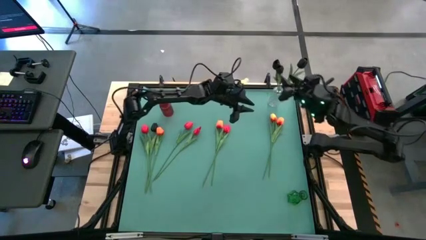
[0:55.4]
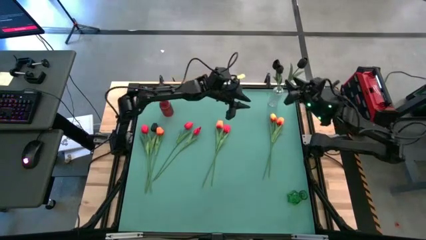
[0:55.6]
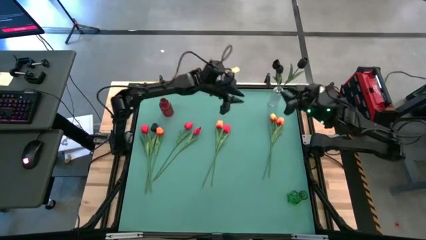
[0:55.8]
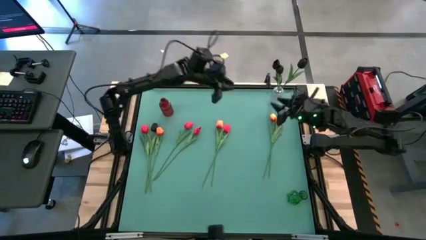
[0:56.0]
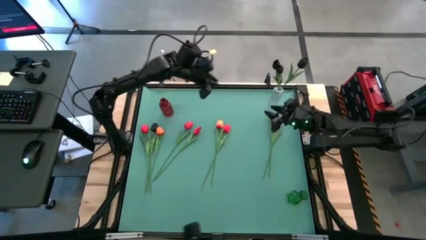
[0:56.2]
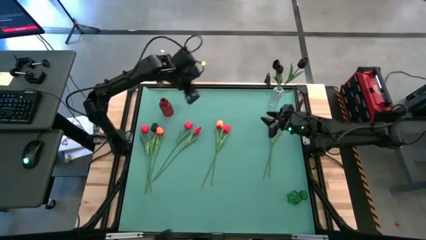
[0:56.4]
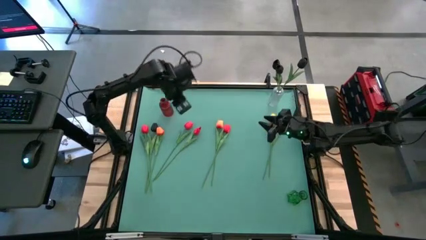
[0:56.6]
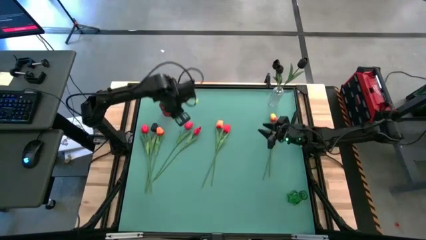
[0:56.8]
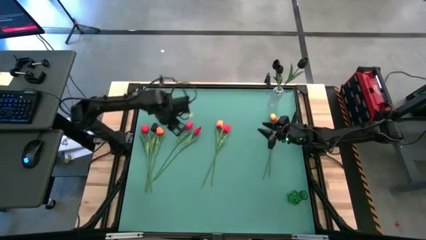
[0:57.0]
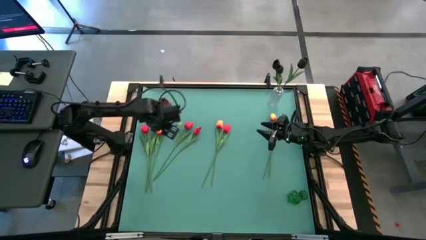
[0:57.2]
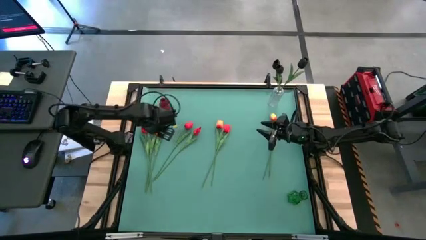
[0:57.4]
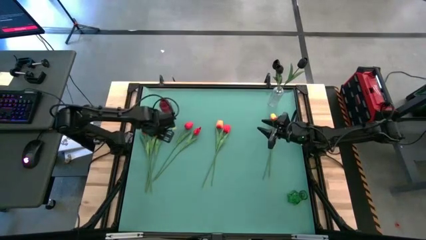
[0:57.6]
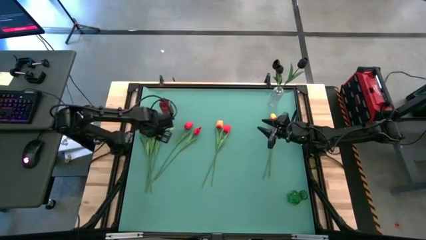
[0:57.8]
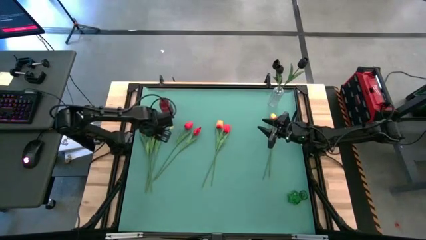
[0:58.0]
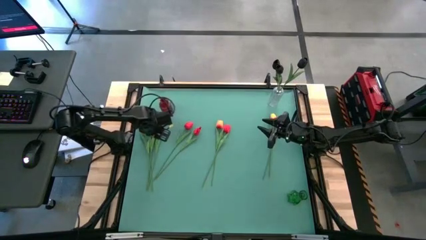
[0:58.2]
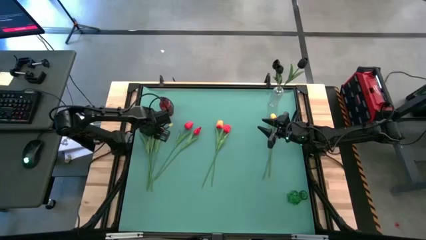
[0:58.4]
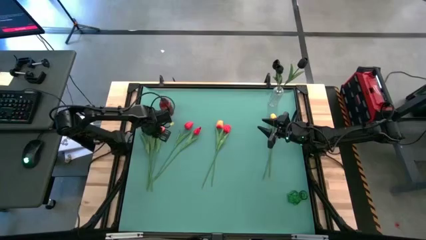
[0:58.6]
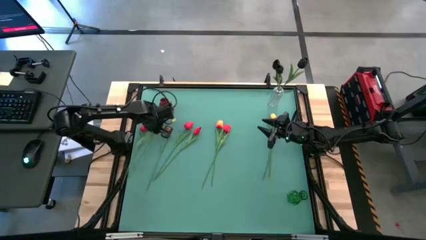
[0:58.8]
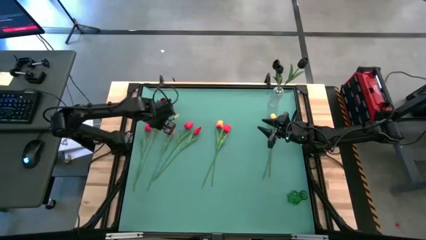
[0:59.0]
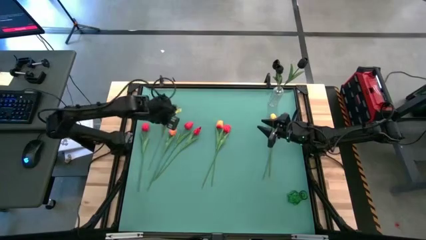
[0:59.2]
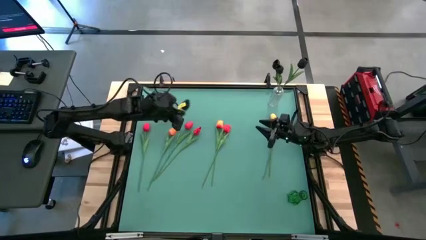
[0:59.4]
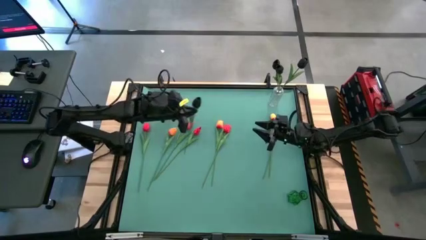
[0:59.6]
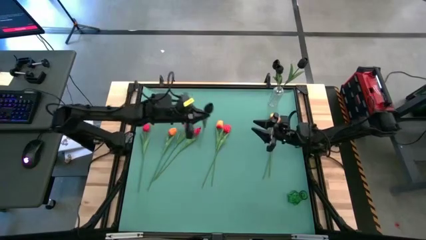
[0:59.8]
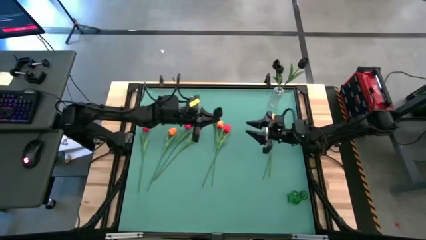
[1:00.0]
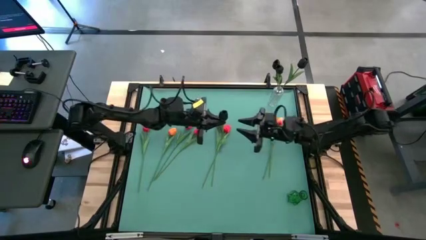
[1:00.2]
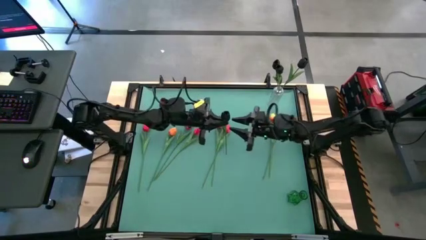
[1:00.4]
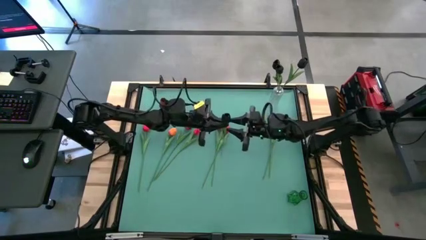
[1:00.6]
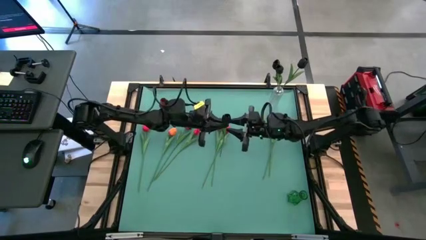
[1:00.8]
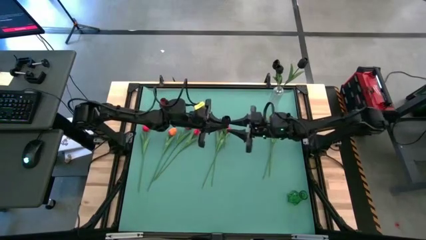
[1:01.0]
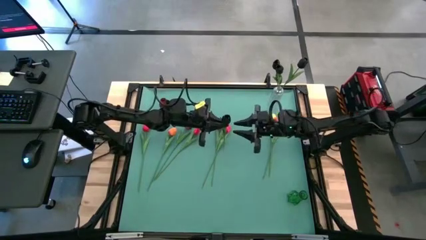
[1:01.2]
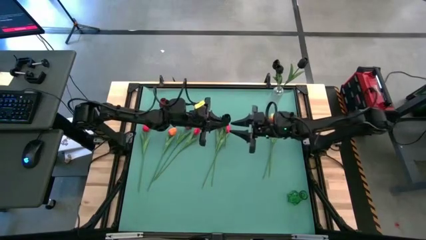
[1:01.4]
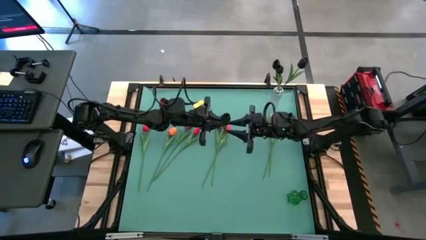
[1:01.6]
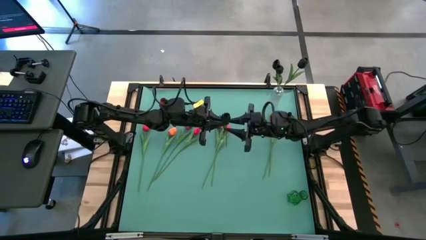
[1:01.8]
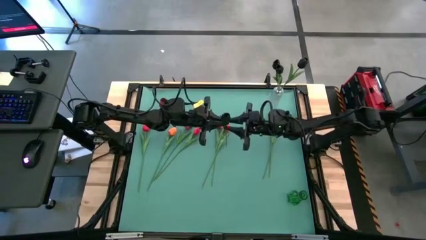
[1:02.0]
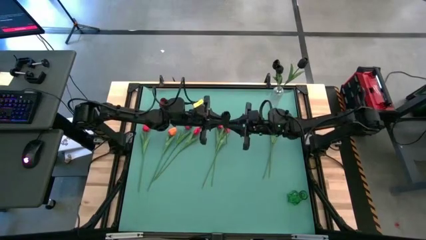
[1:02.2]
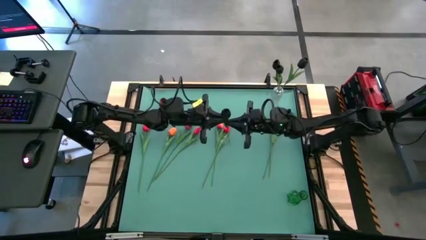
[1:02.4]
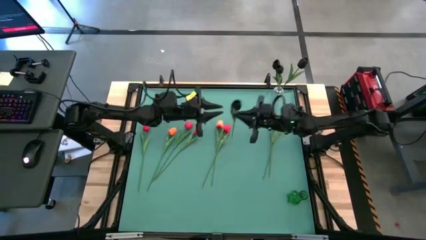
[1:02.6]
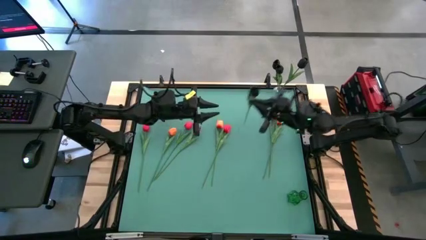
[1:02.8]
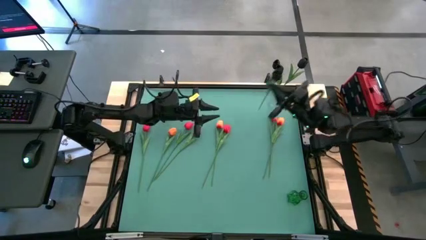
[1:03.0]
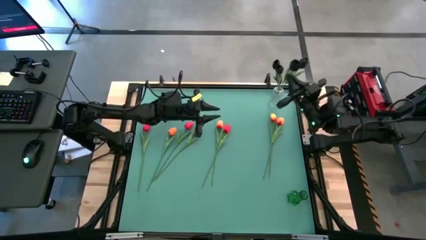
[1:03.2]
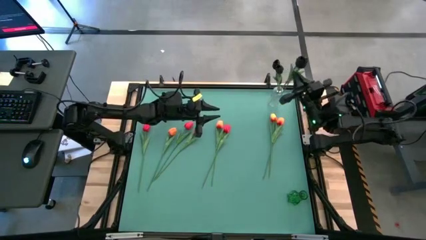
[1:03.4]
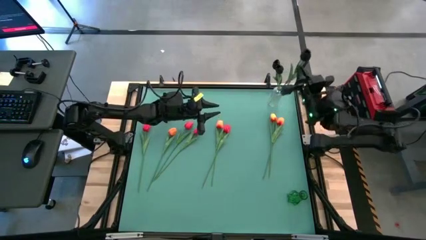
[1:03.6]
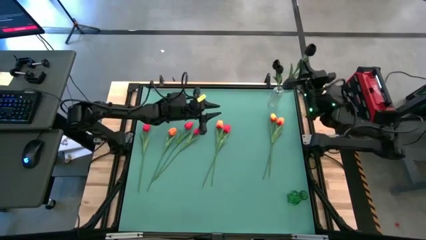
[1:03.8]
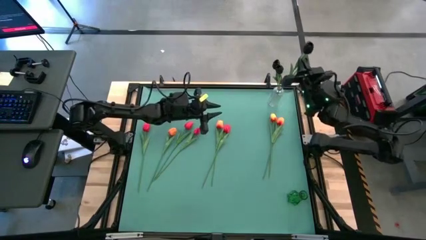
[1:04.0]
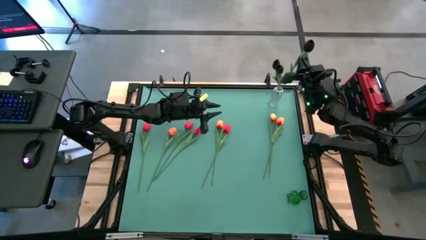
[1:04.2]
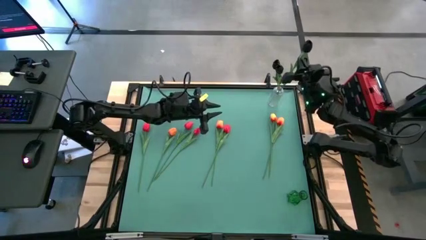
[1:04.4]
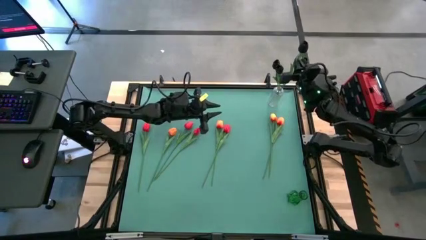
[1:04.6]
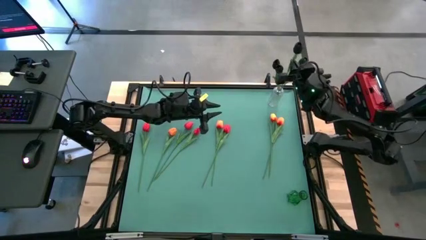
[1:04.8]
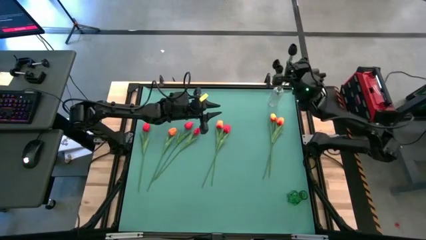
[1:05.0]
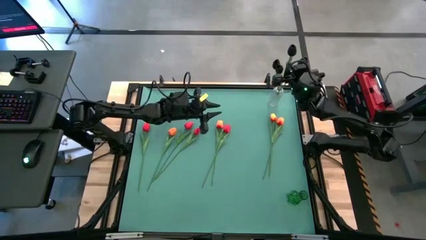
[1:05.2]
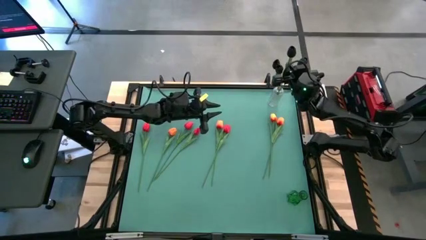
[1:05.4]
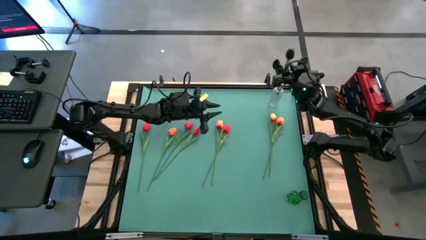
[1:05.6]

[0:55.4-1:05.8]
Task: Sort flowers into vase by color
Put the black tulip into the transparent vase

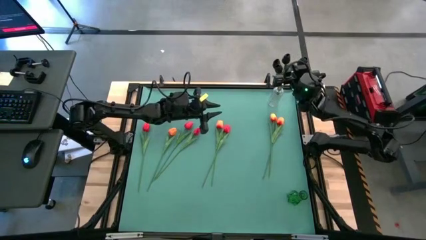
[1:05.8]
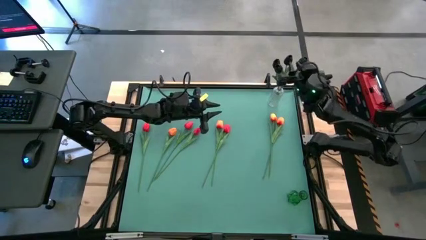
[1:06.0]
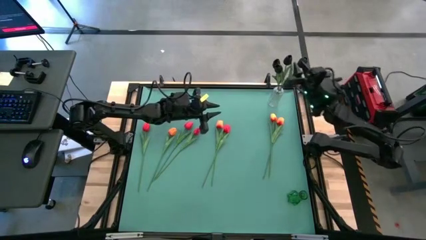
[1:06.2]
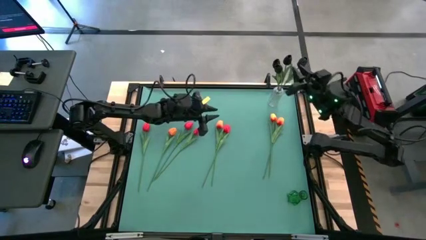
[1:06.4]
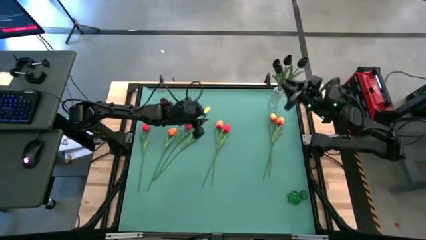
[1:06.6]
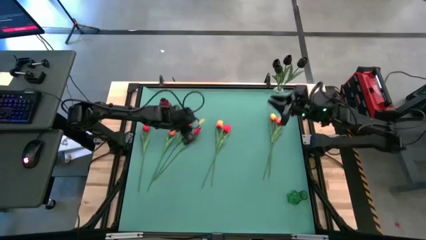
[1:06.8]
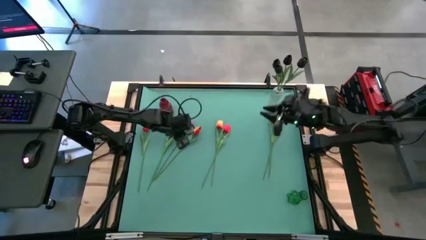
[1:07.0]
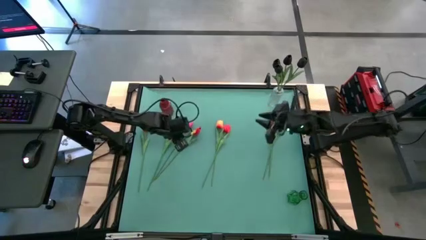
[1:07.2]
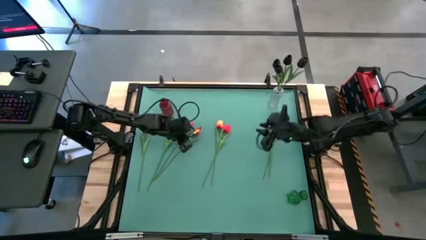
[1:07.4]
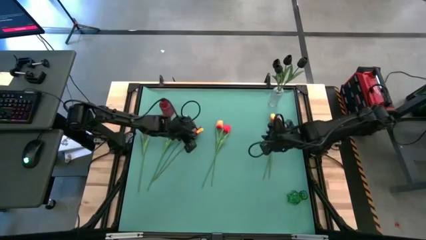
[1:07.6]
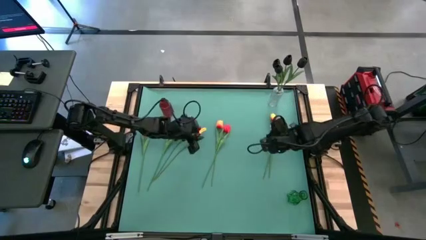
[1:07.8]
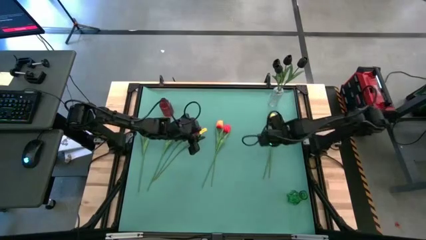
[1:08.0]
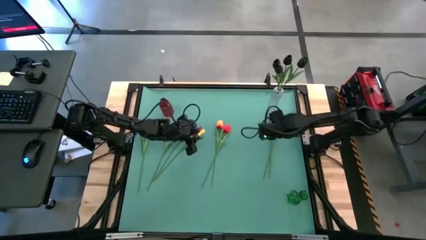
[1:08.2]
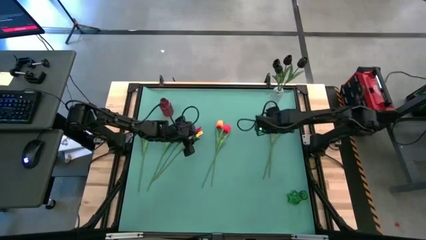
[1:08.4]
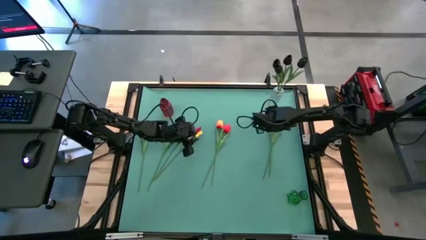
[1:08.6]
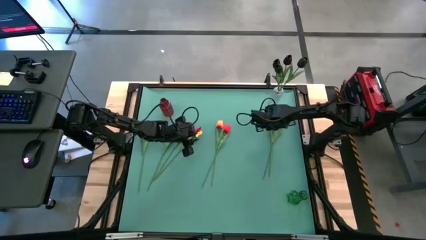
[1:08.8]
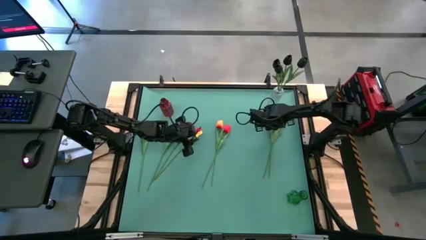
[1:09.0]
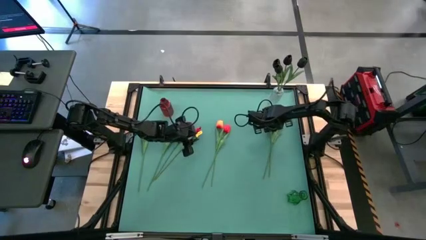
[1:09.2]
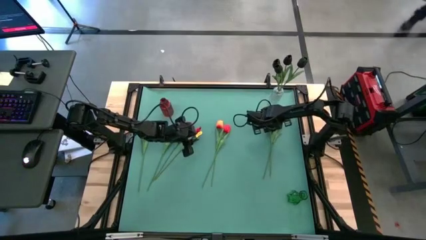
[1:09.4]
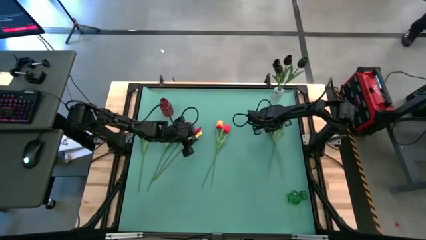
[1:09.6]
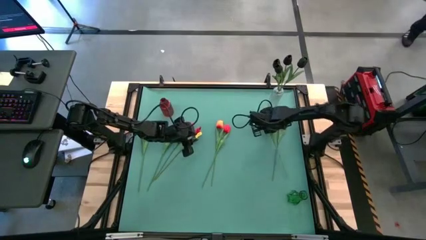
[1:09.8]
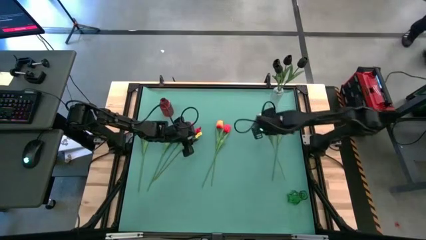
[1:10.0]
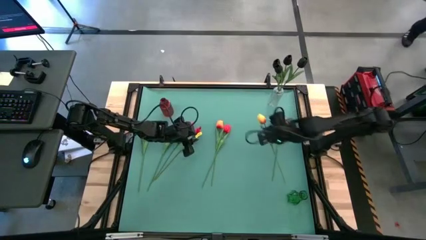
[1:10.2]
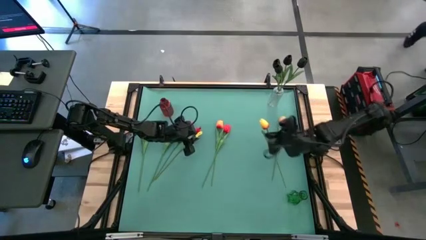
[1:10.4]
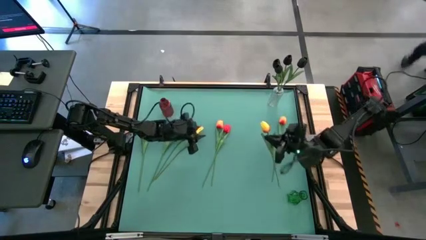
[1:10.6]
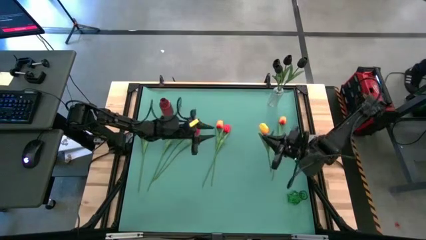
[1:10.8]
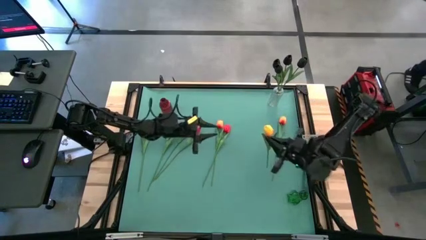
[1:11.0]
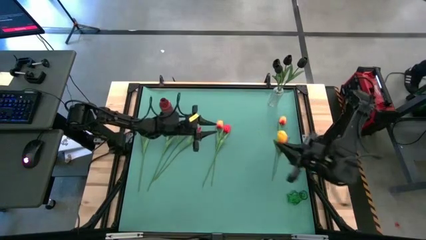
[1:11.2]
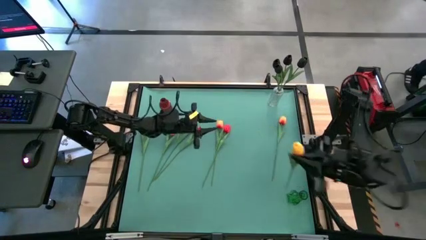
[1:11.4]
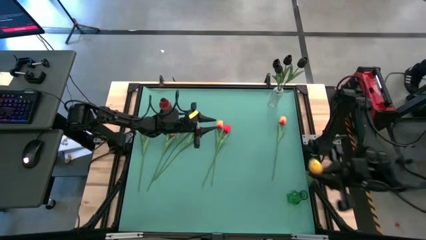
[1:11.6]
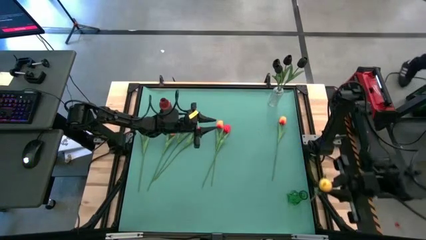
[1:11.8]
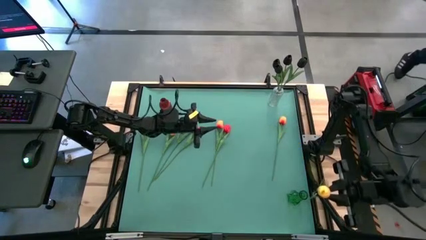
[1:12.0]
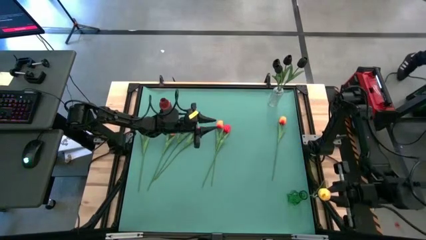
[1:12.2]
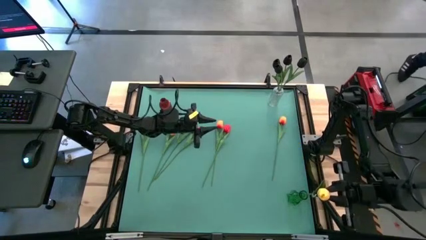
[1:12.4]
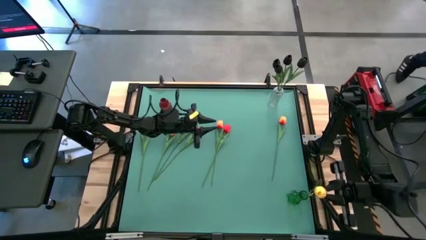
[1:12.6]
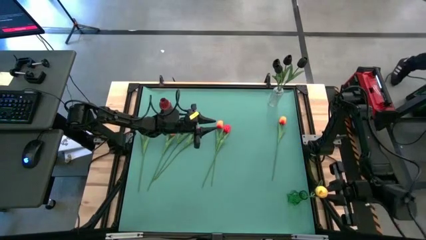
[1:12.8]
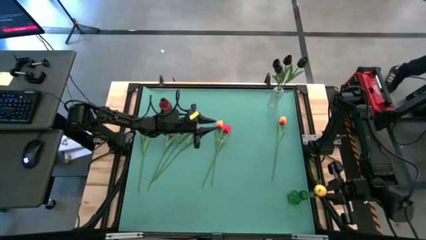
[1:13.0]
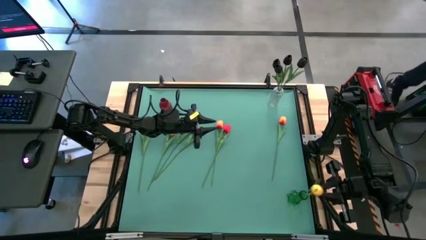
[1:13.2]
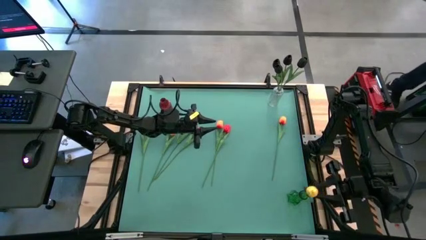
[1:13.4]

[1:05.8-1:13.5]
Put the orange tulip into the green vase
